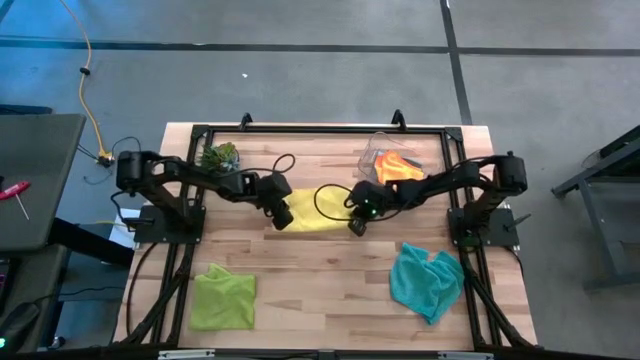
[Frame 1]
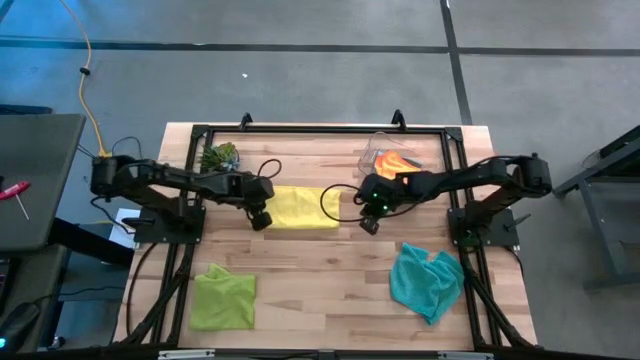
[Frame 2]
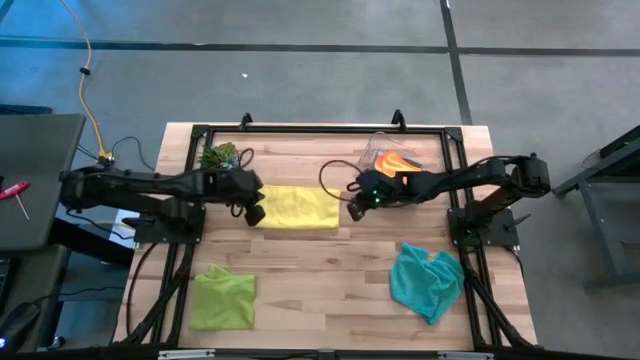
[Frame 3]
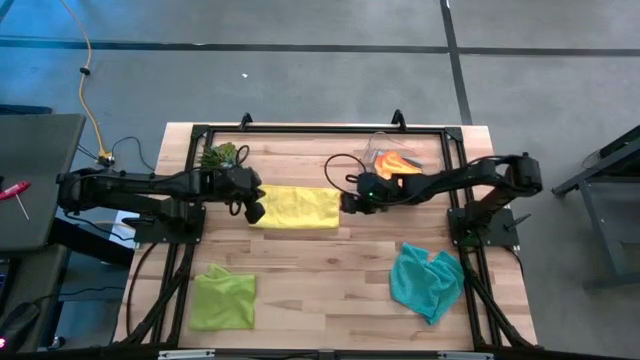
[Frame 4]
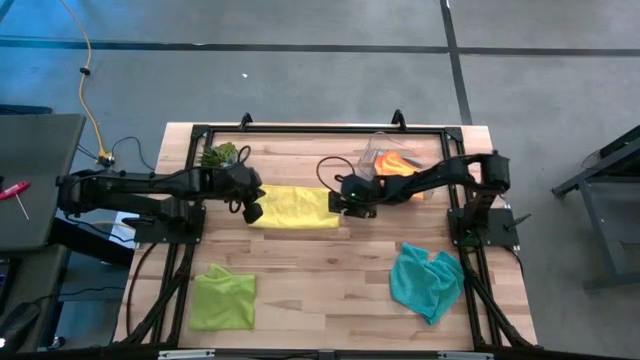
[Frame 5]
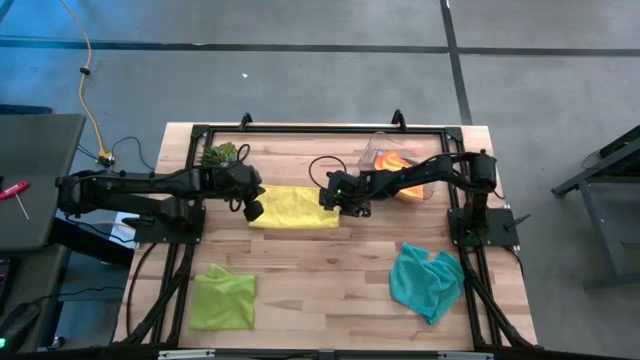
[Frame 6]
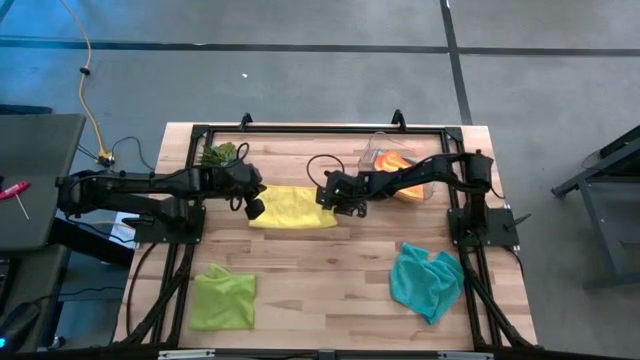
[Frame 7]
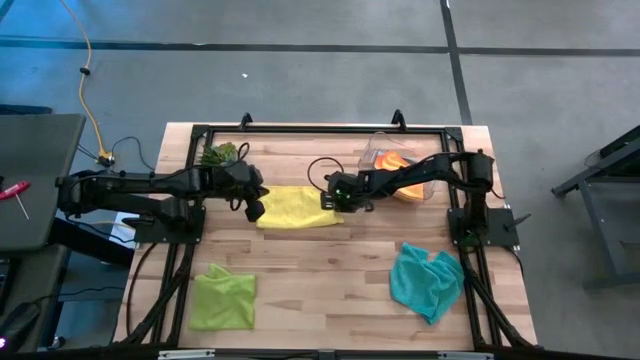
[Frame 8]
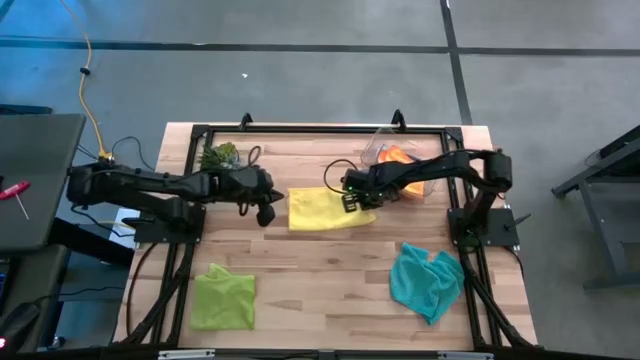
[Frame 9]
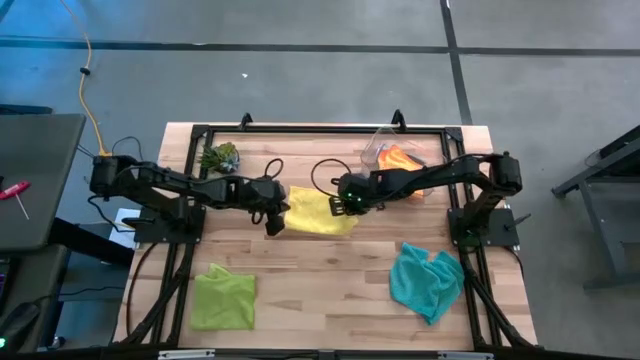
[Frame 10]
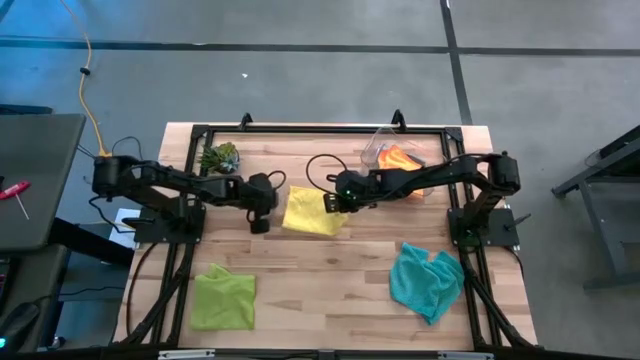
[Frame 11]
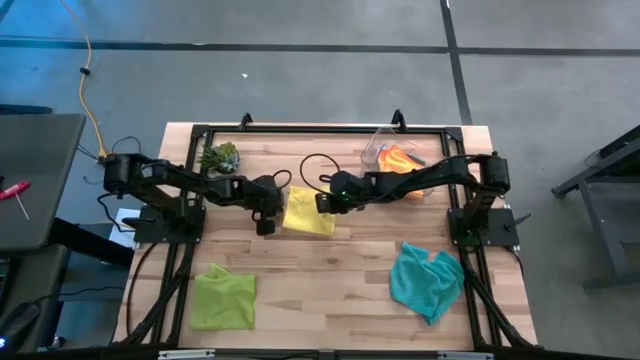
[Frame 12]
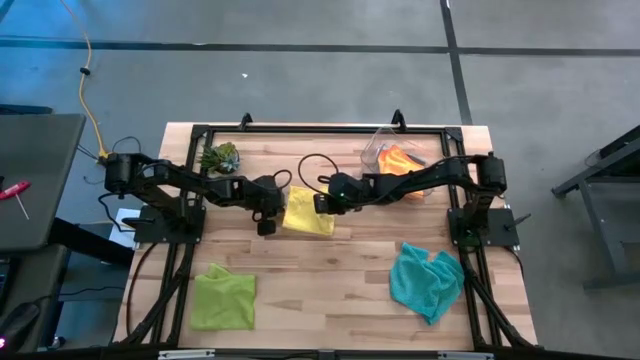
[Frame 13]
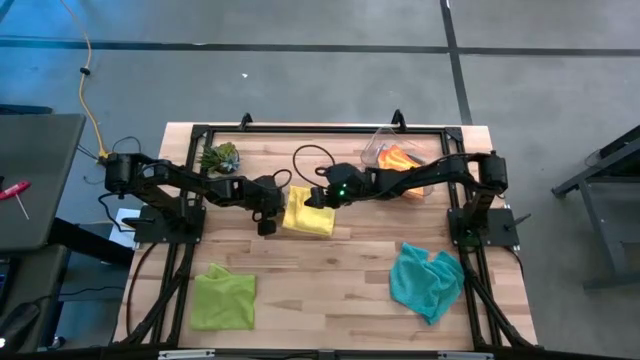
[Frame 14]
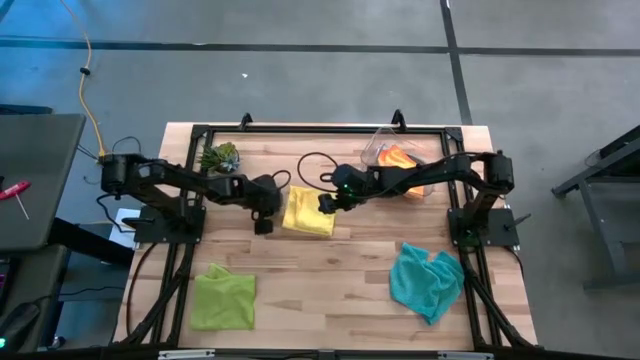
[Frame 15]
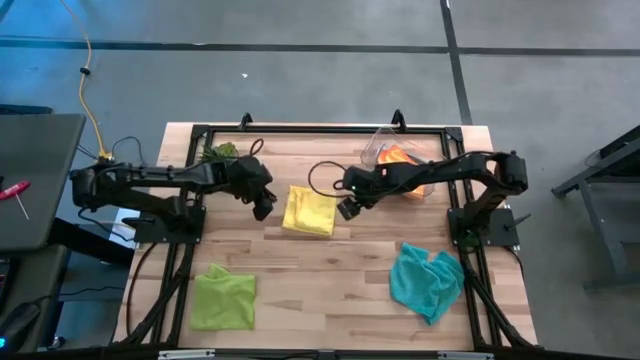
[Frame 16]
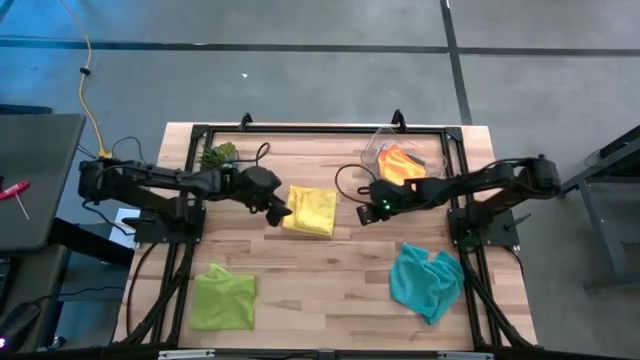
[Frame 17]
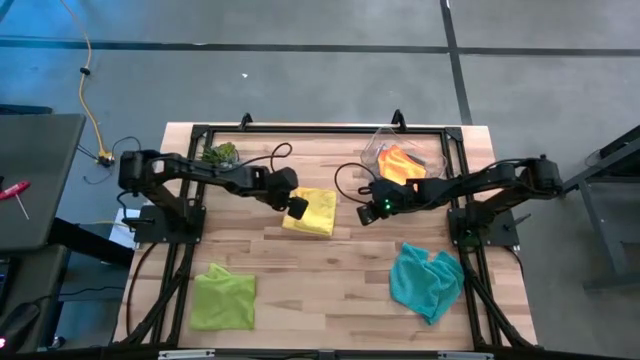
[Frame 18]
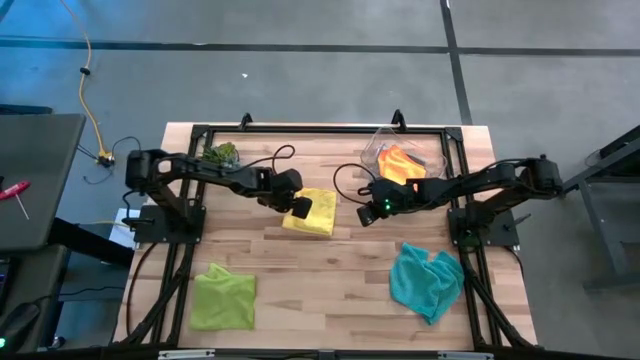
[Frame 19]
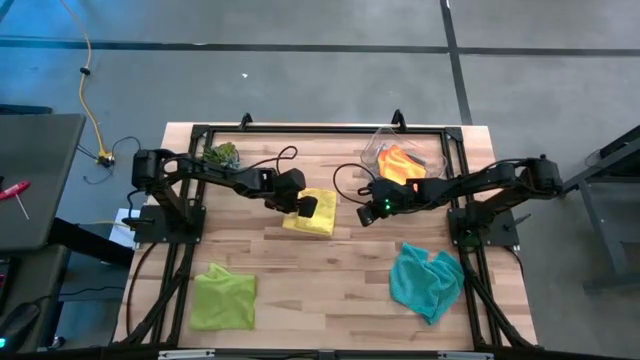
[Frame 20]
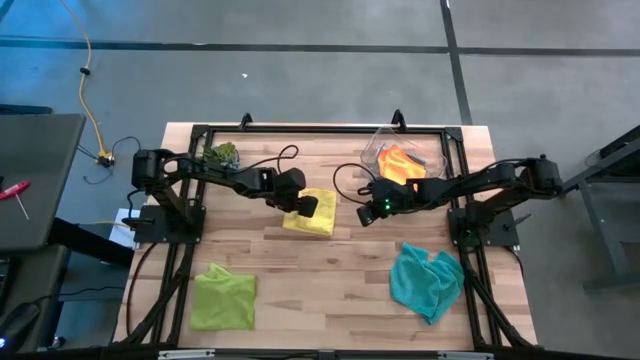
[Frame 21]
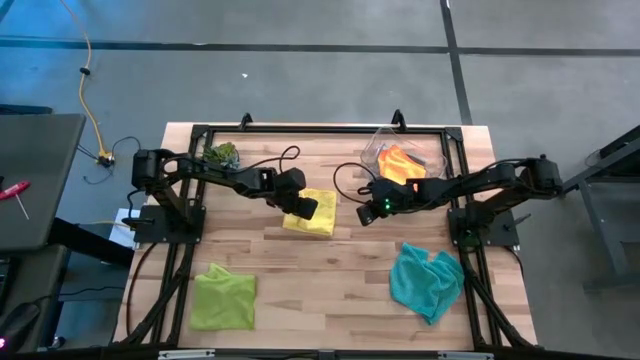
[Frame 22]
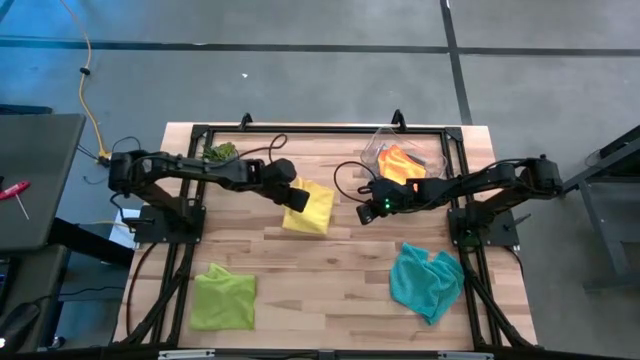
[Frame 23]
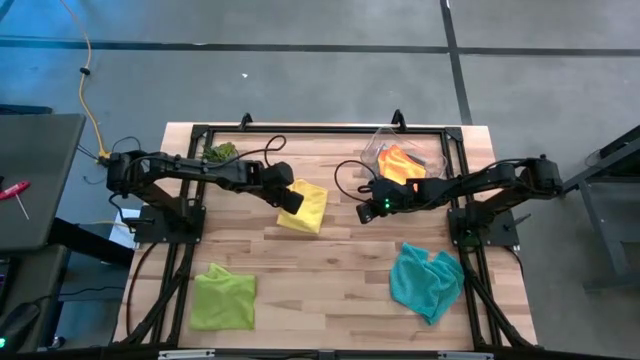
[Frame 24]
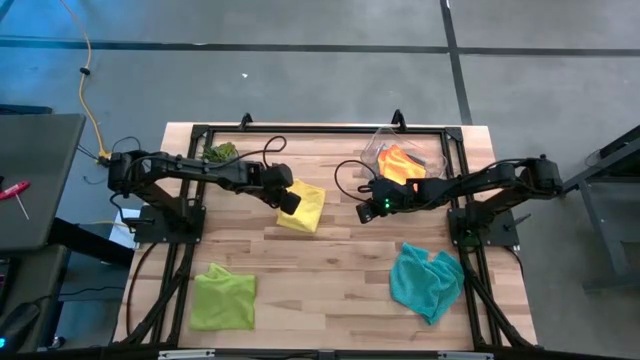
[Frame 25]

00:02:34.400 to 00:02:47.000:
Task: Fold microfiber towels
Fold the yellow microfiber towel

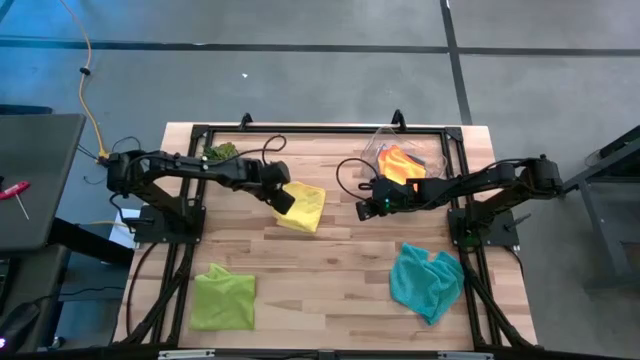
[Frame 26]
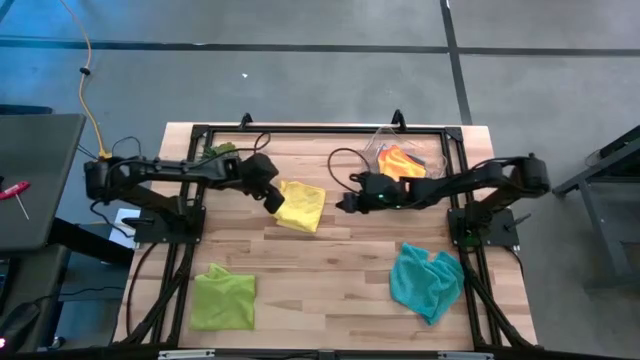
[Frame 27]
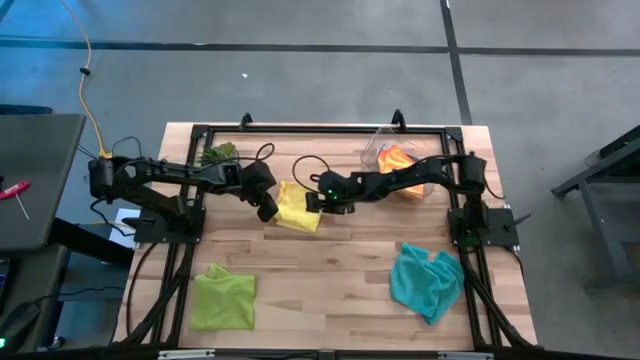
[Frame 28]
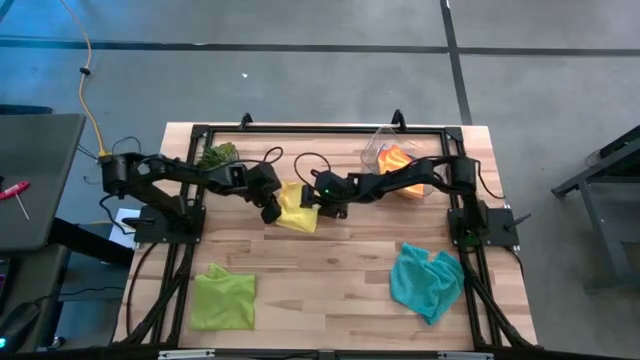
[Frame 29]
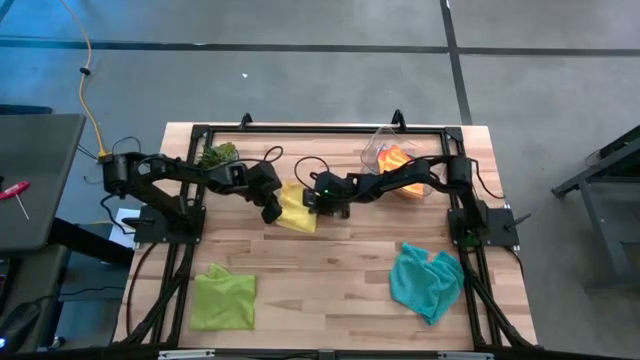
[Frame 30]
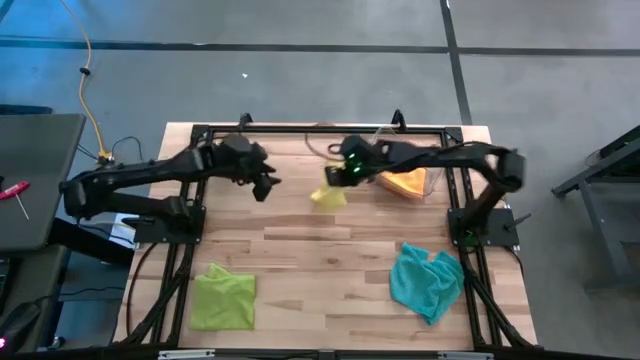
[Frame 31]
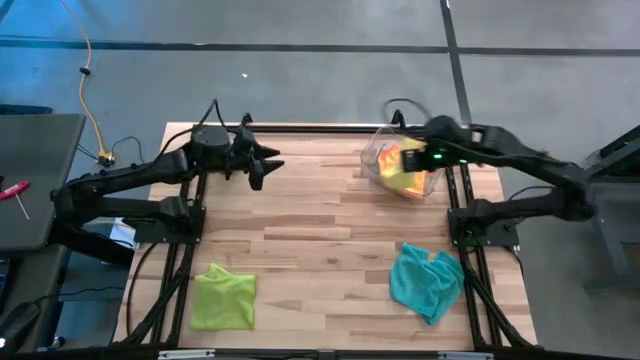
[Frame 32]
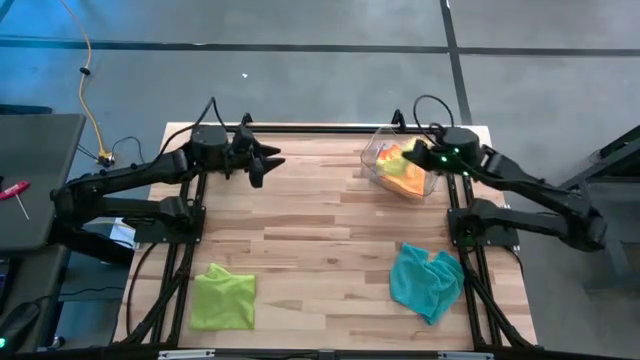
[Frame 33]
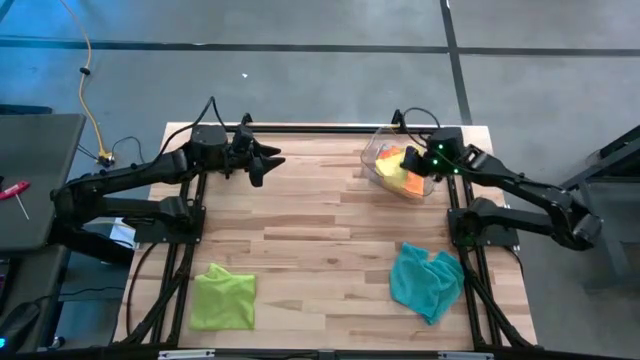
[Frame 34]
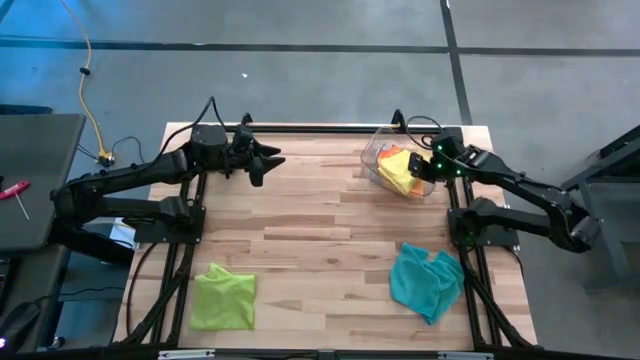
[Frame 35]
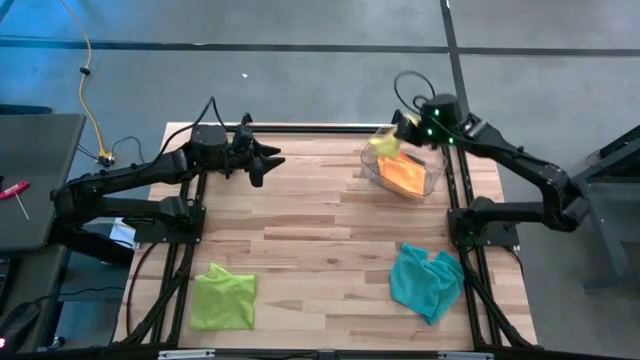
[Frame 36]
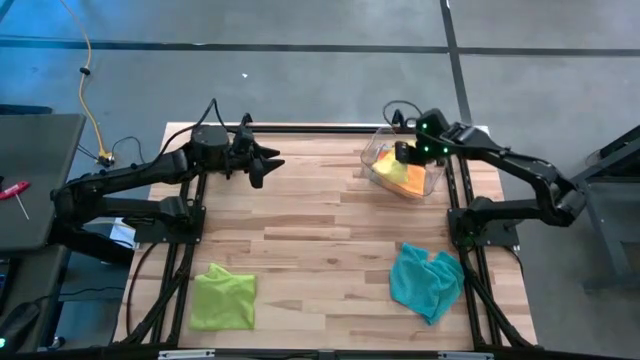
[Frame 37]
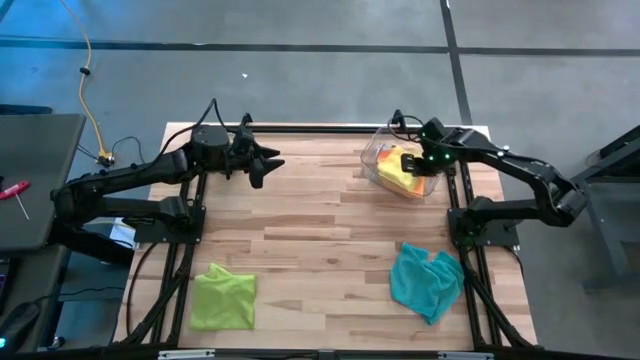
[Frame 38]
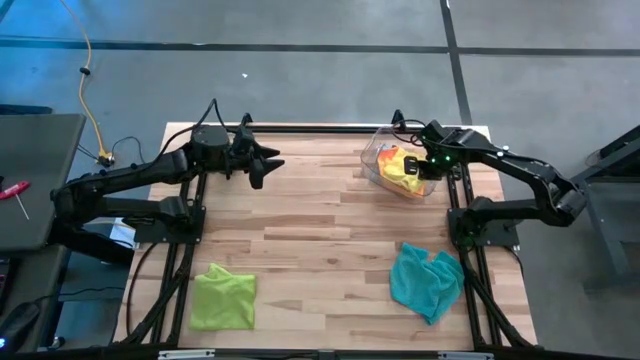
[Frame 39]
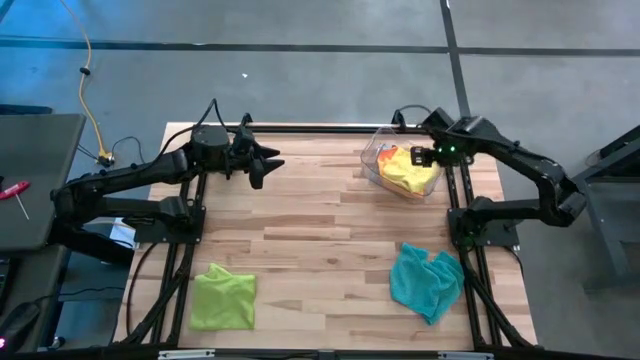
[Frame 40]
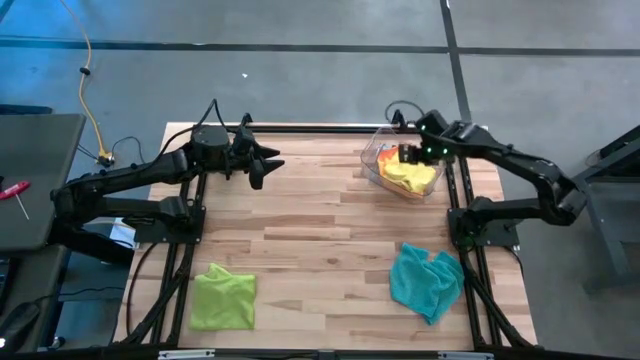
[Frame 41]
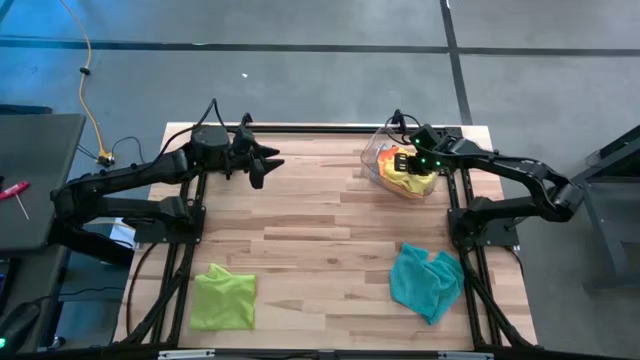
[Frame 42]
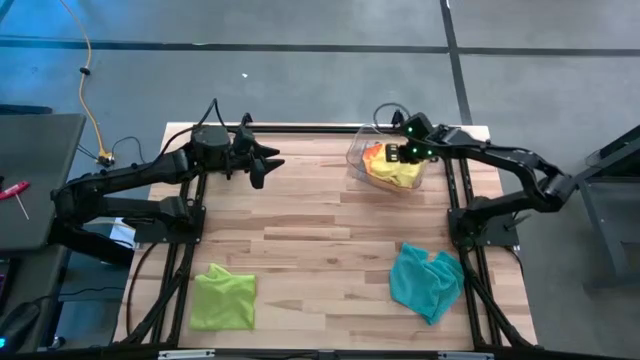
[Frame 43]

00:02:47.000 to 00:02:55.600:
Put the yellow microfiber towel into the transparent bin
